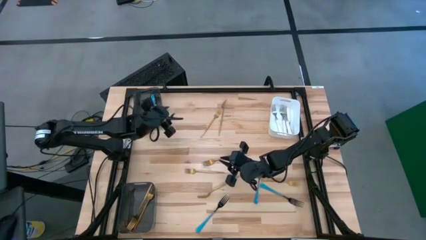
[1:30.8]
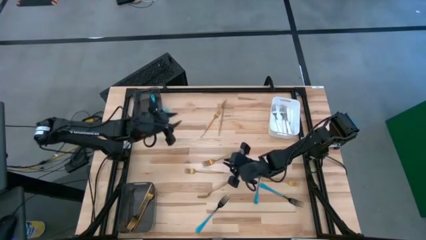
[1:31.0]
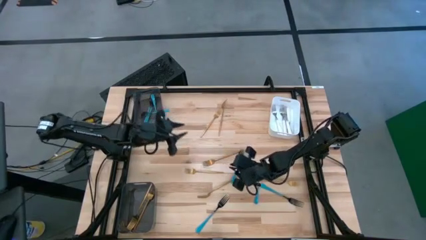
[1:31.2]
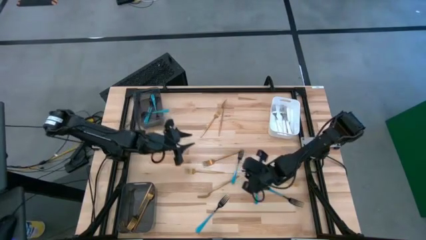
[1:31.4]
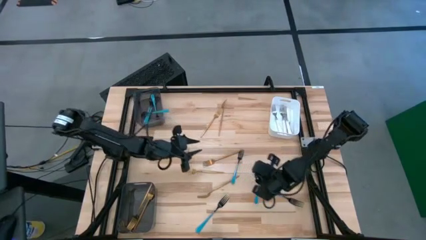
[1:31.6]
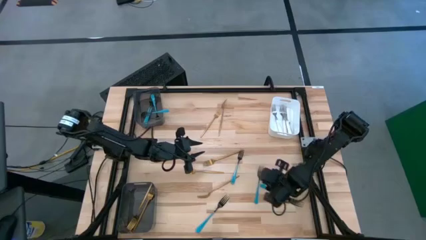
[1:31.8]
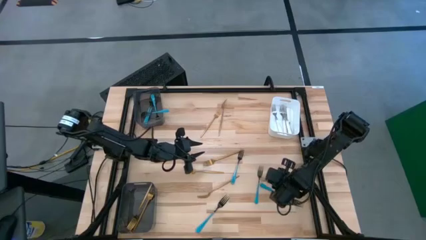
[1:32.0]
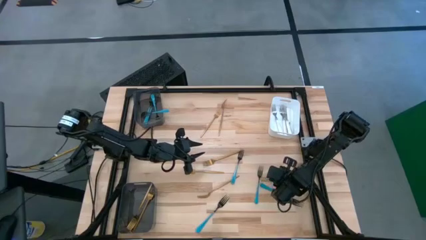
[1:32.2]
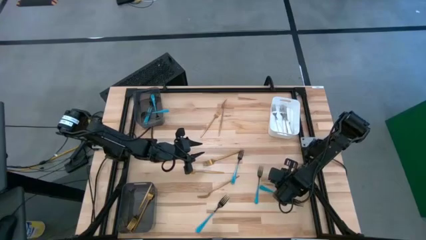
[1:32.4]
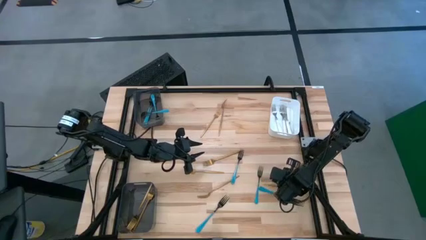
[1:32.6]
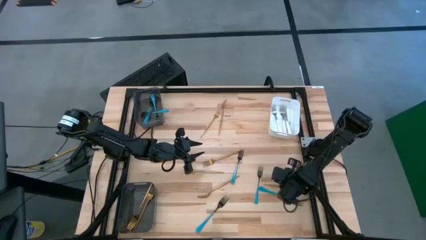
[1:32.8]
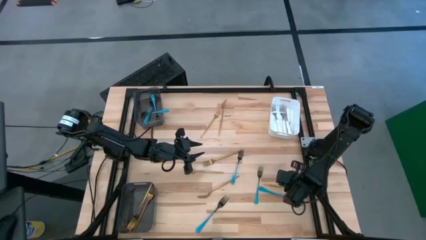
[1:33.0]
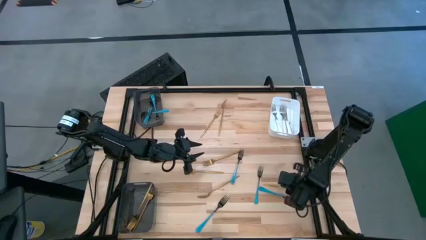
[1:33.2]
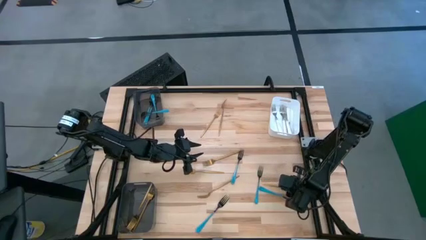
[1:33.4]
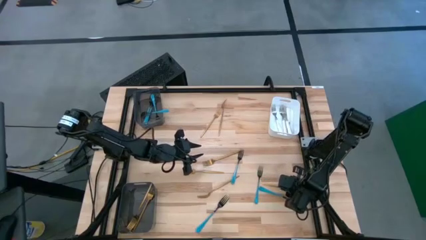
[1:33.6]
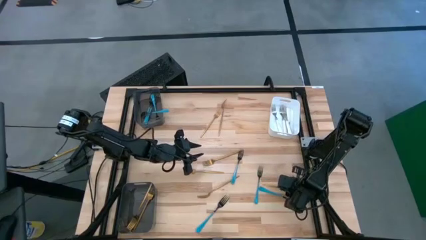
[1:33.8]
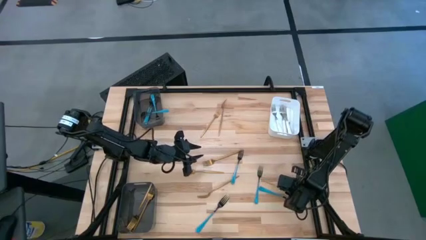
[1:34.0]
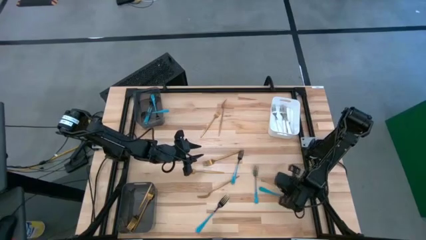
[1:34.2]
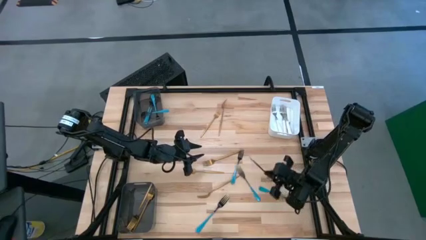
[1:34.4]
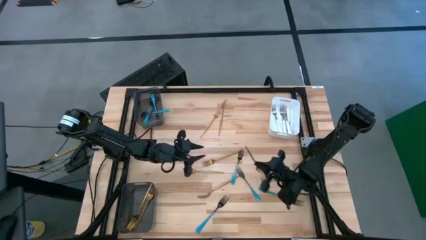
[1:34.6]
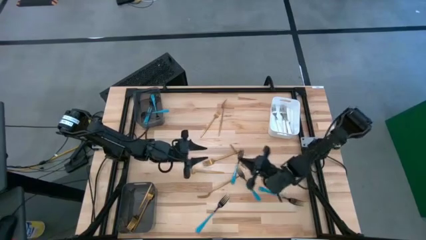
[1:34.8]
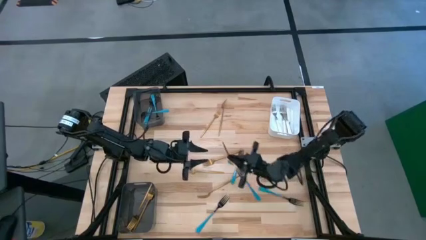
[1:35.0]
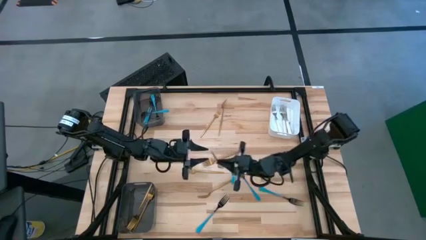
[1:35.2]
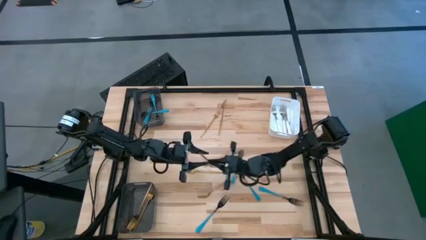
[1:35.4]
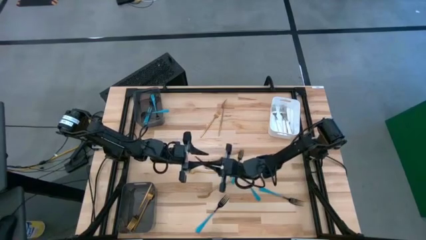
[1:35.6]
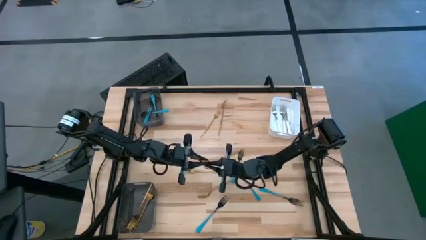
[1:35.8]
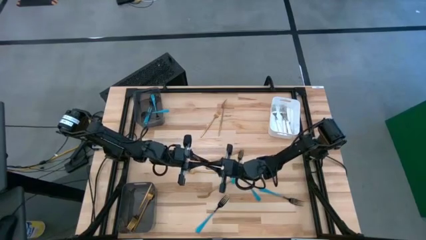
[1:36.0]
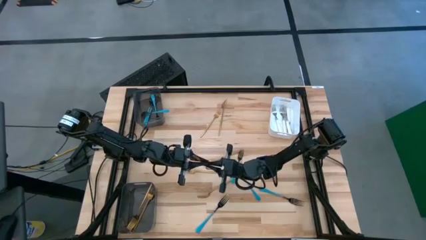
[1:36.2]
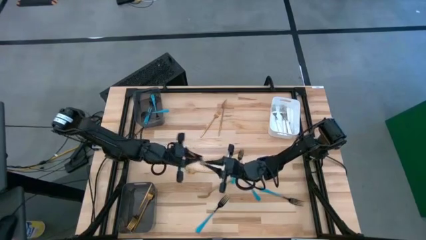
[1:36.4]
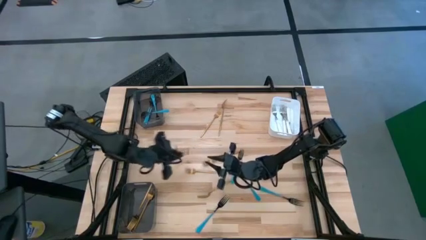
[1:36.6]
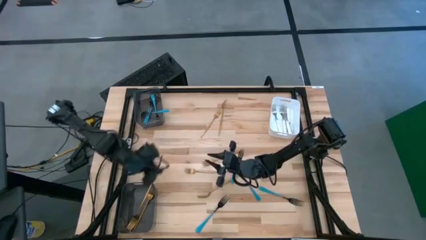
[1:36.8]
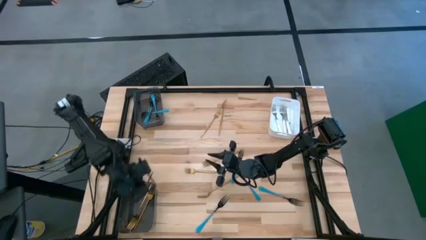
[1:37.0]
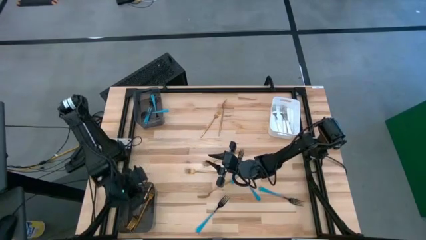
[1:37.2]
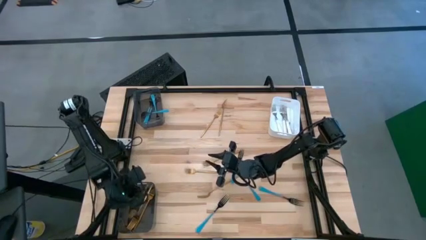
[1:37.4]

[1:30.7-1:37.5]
Task: Sort silverware by color (type)
Put the gold fork into the bottom black bin

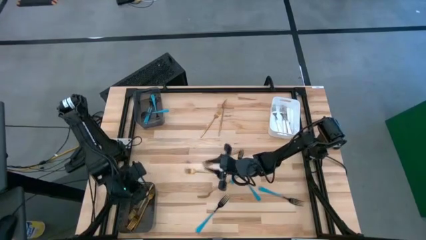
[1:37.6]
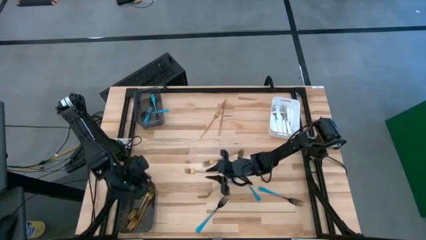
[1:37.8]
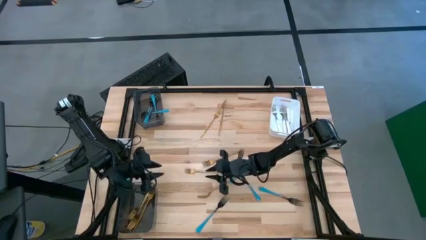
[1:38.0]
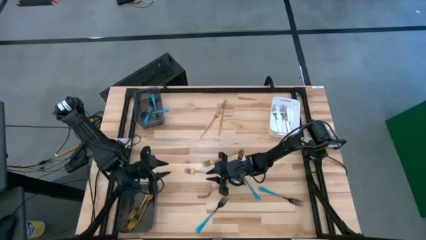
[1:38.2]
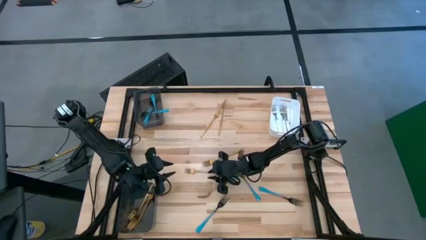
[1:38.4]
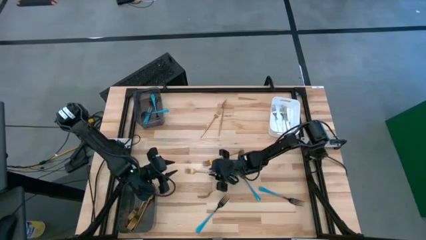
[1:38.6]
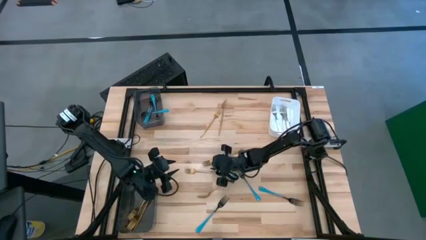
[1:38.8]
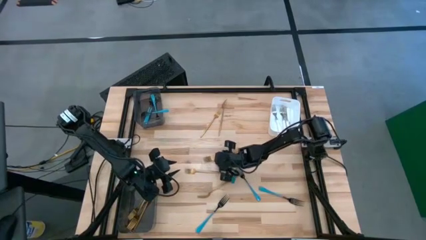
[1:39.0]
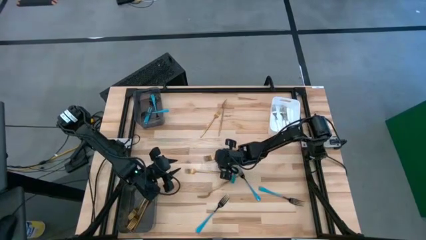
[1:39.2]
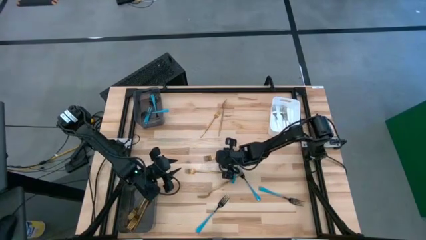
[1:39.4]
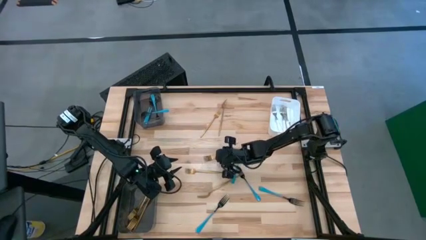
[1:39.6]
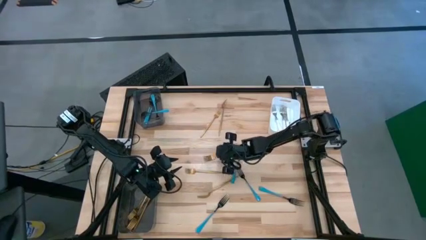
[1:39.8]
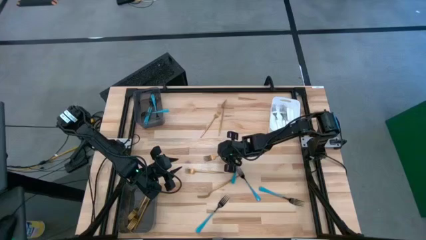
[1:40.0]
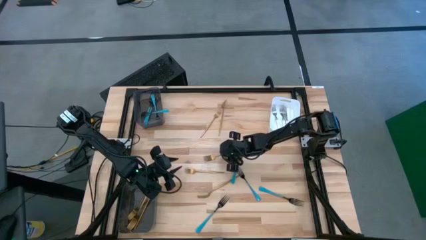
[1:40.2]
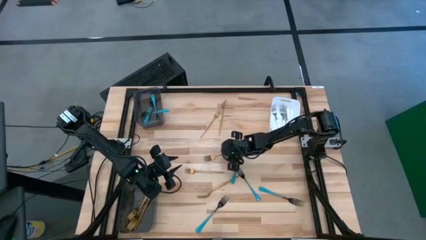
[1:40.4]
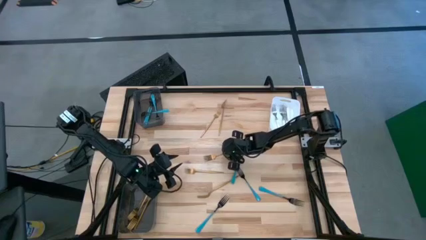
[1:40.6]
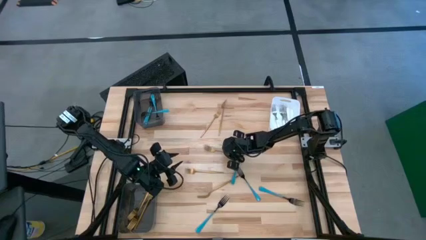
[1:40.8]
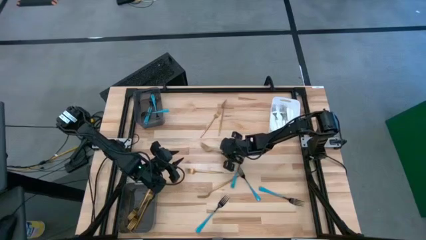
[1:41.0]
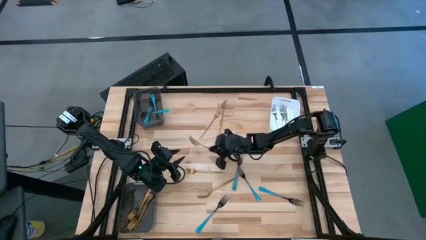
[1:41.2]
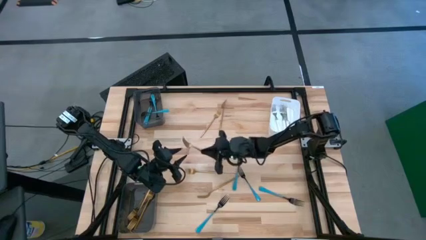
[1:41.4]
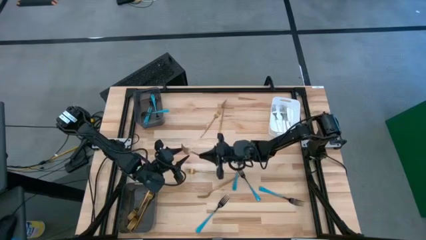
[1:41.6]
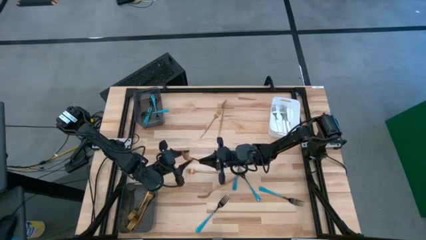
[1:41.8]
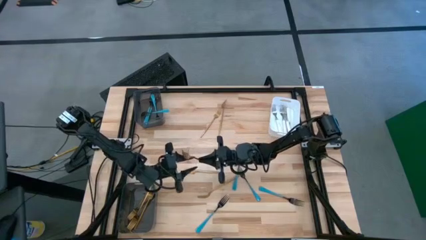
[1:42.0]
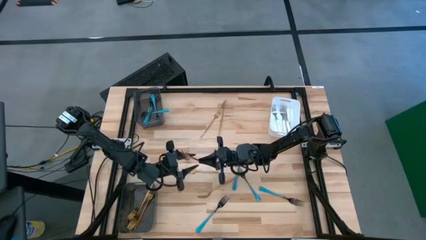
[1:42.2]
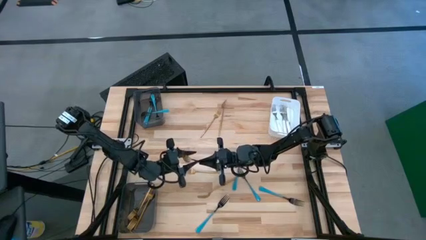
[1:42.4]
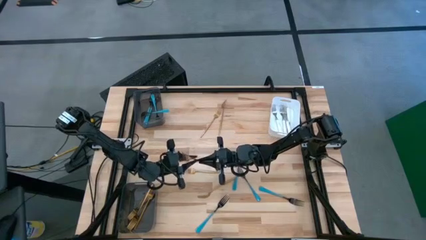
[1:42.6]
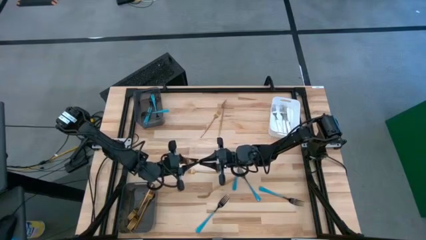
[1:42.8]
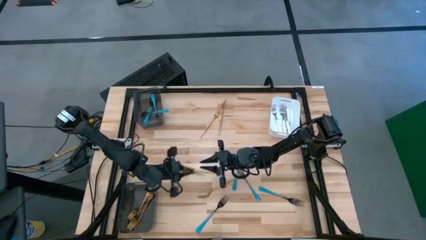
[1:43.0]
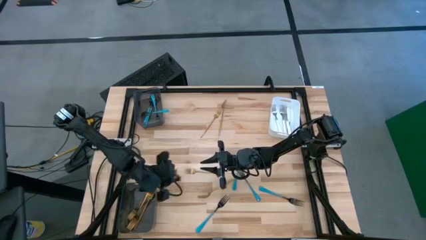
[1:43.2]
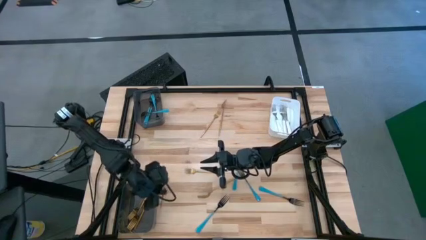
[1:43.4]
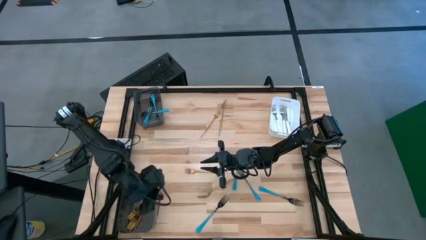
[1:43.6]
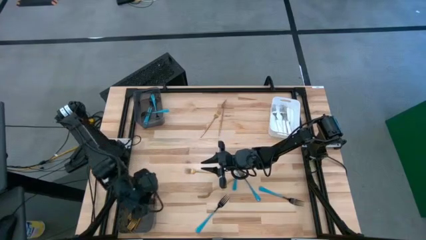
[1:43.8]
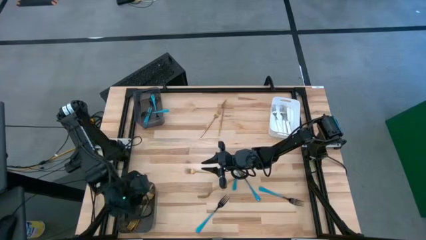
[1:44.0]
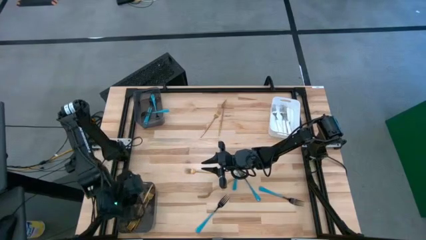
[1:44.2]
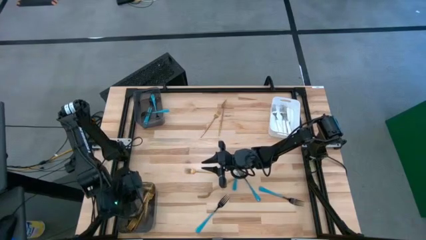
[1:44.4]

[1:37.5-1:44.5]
Put the gold fork into the bottom black bin

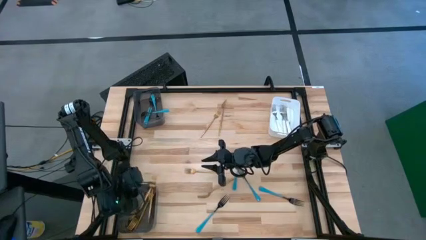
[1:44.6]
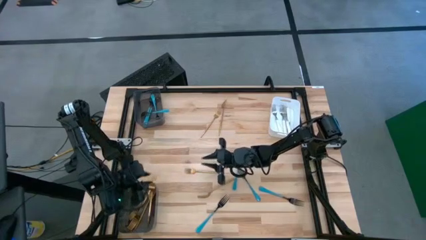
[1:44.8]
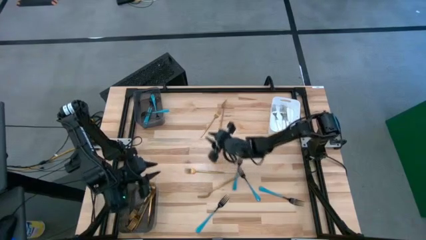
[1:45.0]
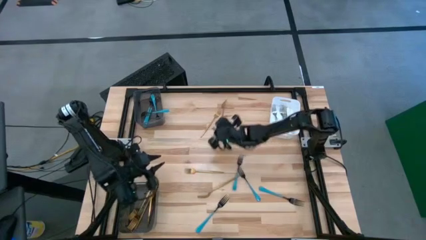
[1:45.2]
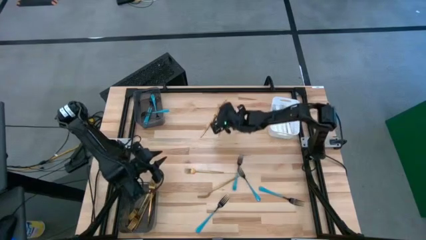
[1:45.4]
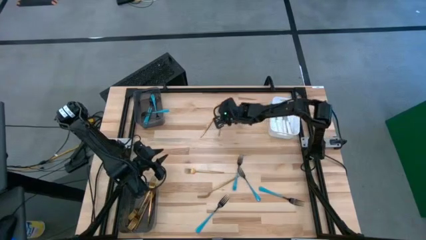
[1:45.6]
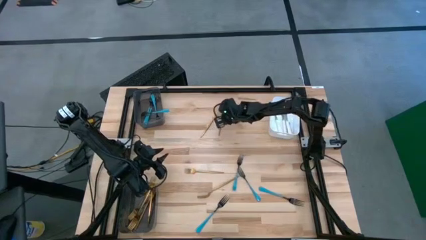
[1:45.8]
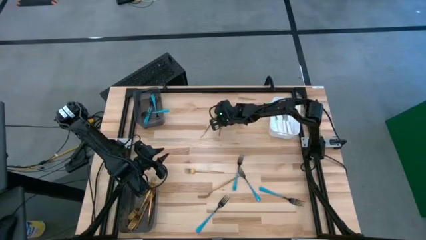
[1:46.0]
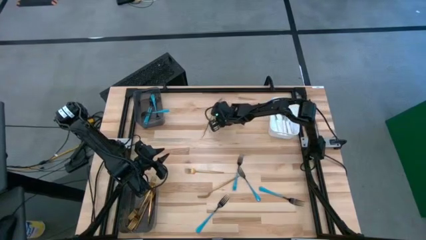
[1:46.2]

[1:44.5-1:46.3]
Put the gold fork into the bottom black bin
